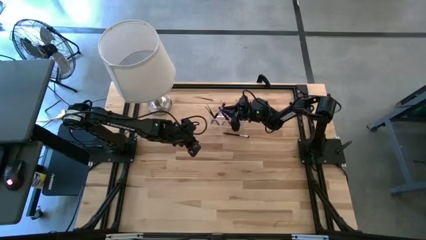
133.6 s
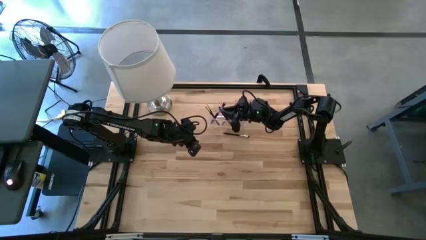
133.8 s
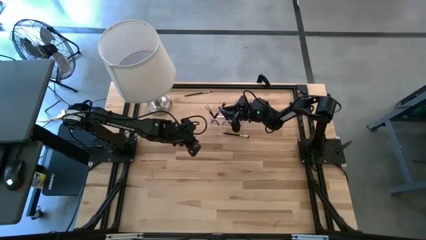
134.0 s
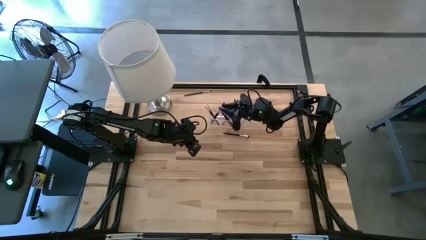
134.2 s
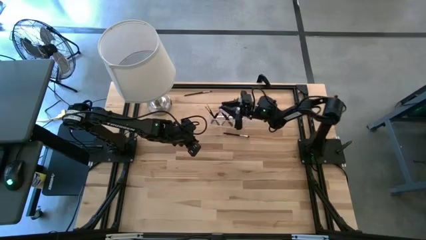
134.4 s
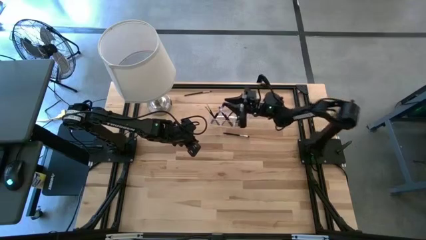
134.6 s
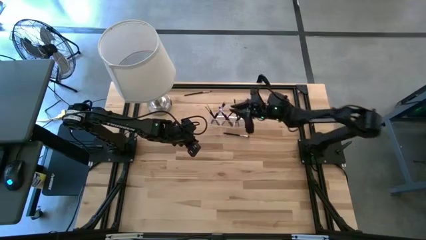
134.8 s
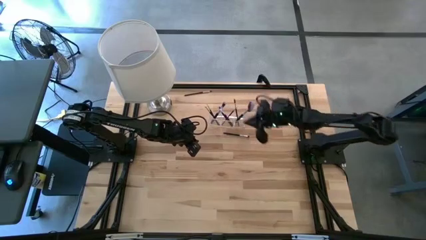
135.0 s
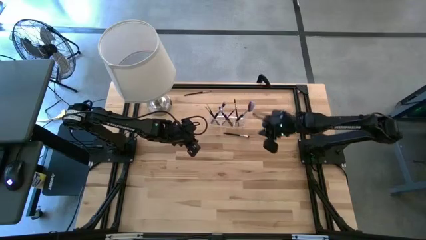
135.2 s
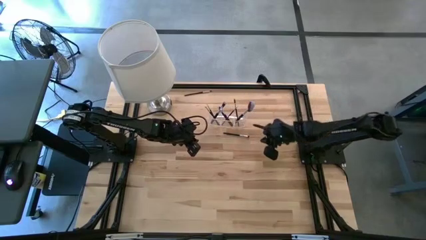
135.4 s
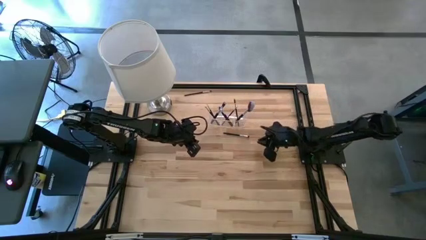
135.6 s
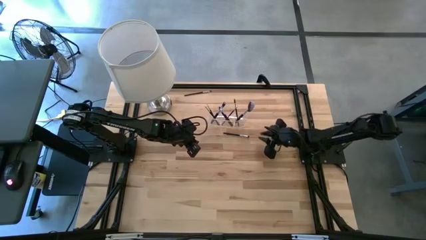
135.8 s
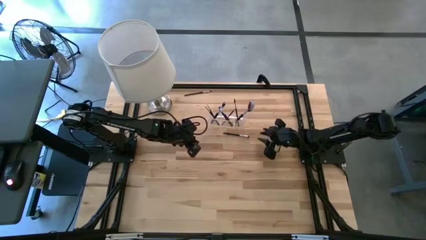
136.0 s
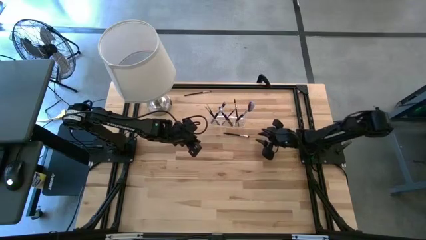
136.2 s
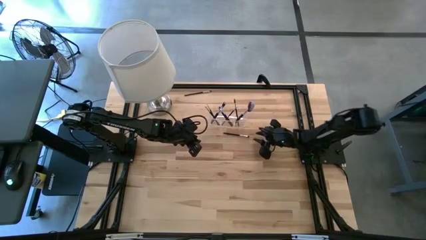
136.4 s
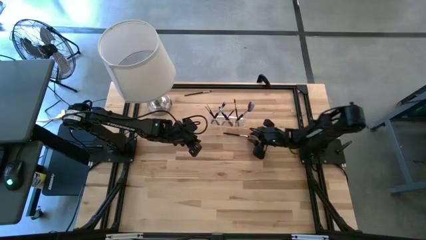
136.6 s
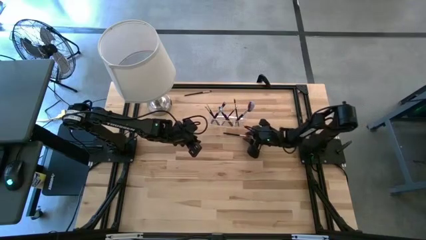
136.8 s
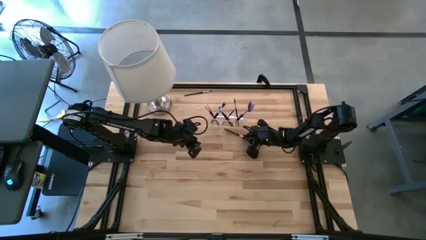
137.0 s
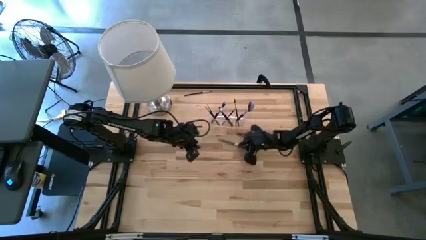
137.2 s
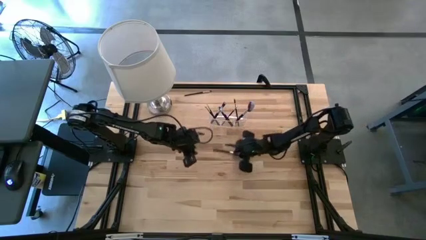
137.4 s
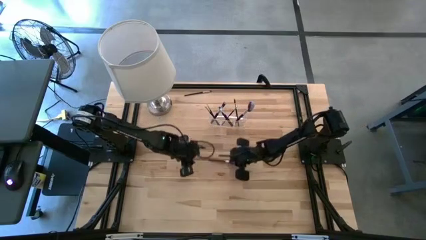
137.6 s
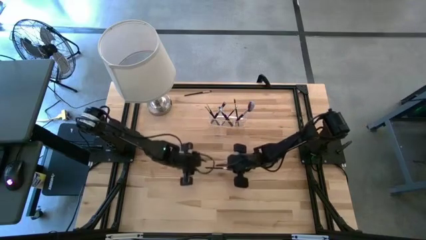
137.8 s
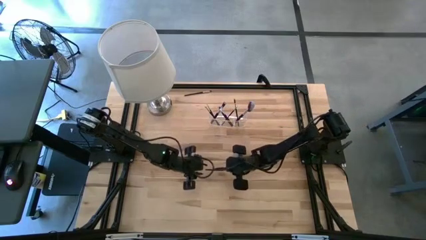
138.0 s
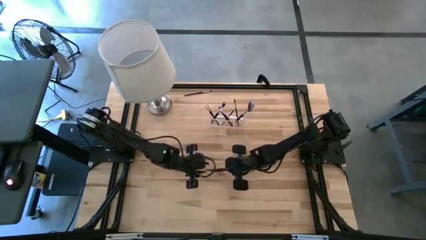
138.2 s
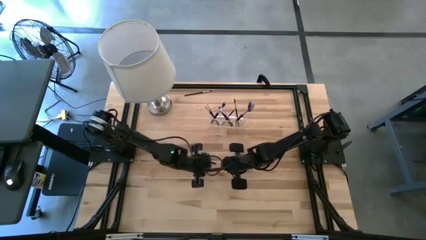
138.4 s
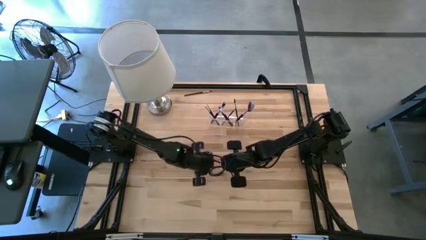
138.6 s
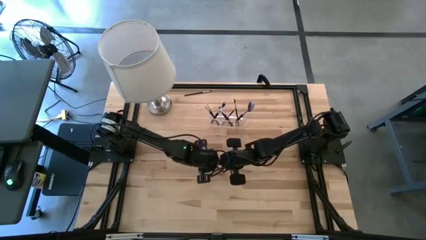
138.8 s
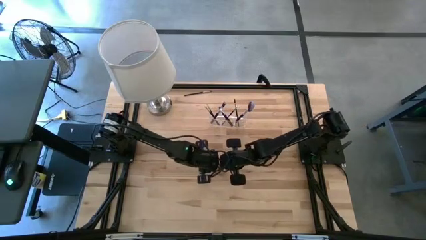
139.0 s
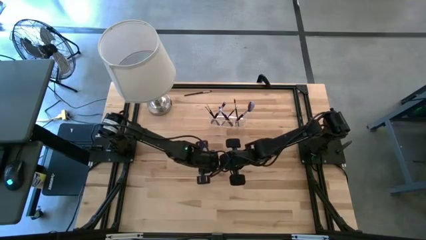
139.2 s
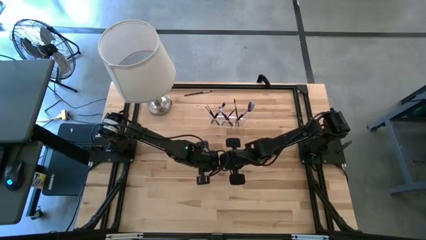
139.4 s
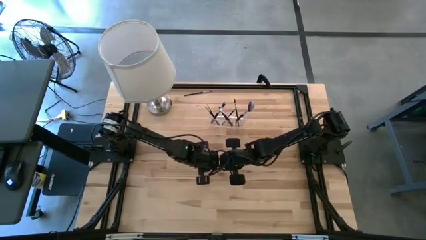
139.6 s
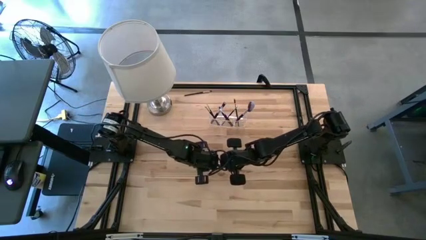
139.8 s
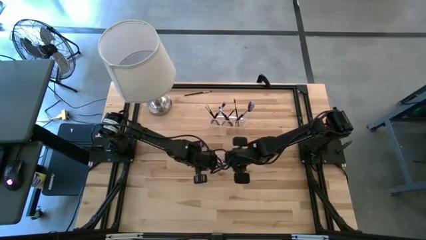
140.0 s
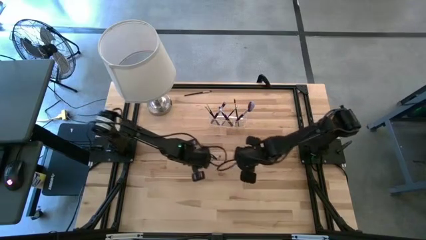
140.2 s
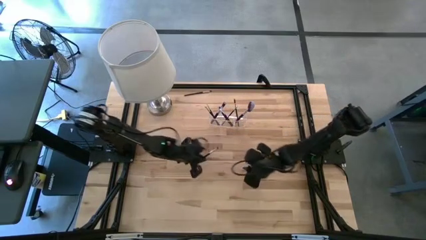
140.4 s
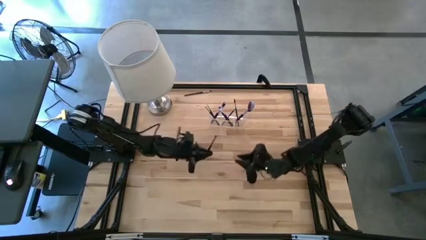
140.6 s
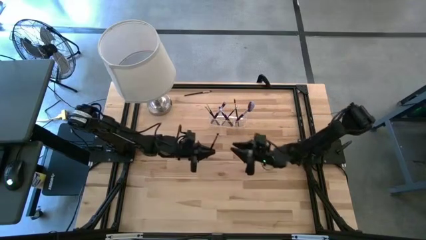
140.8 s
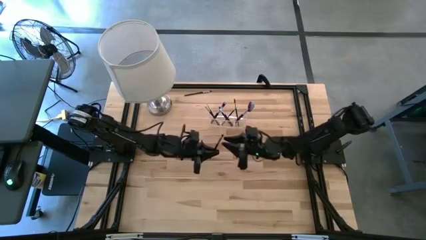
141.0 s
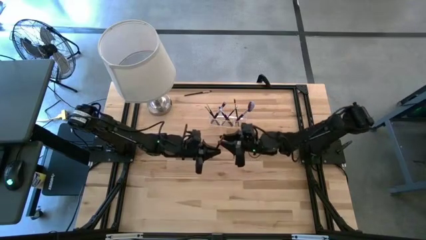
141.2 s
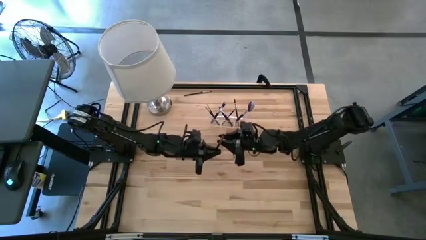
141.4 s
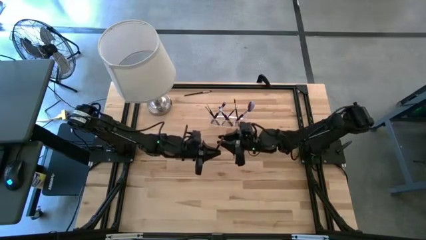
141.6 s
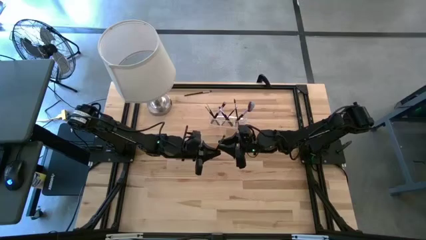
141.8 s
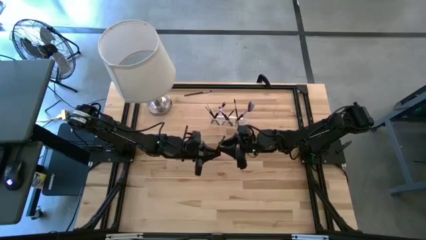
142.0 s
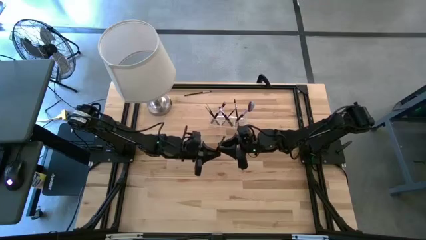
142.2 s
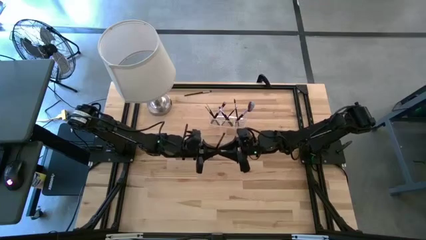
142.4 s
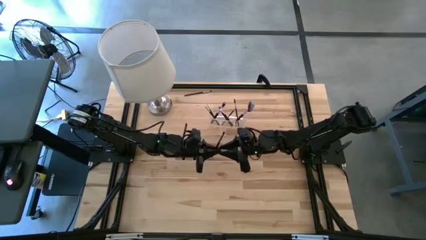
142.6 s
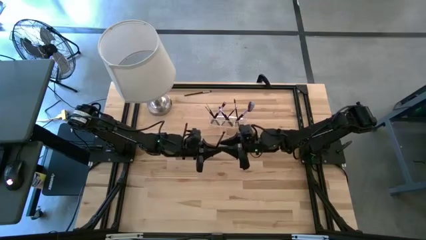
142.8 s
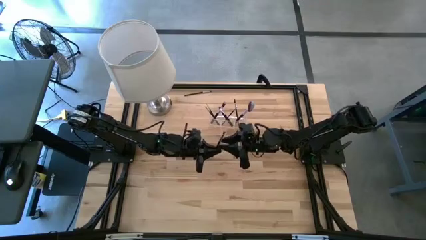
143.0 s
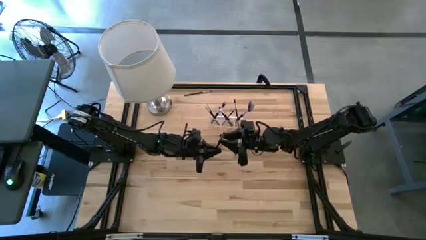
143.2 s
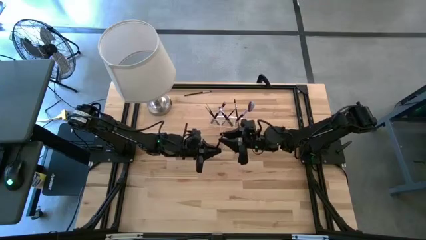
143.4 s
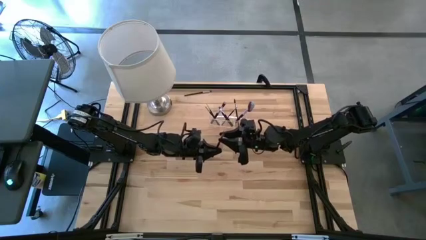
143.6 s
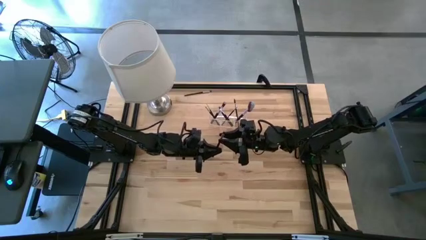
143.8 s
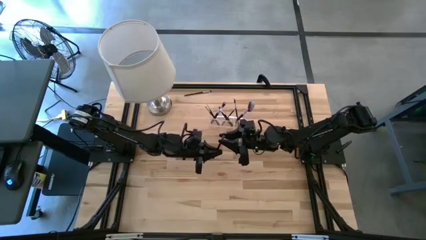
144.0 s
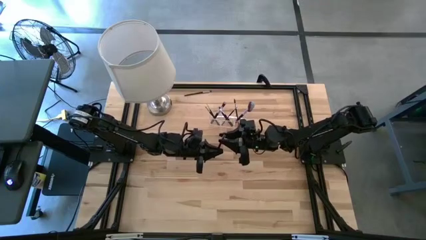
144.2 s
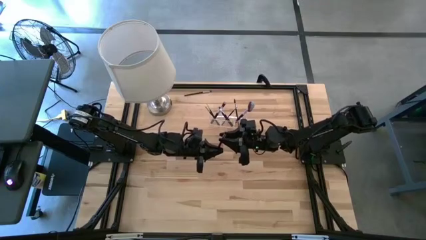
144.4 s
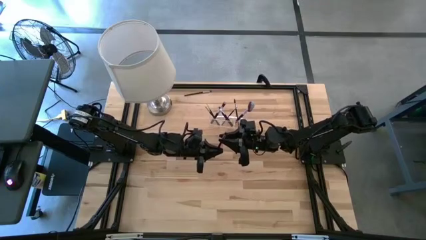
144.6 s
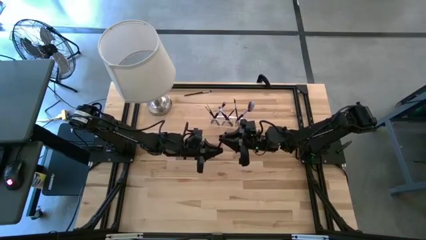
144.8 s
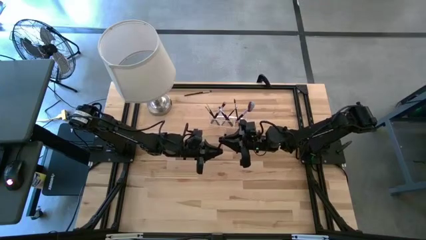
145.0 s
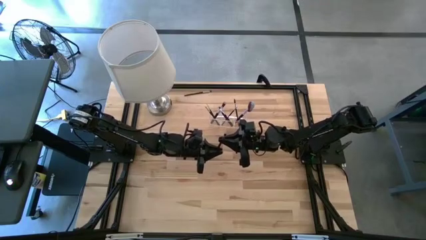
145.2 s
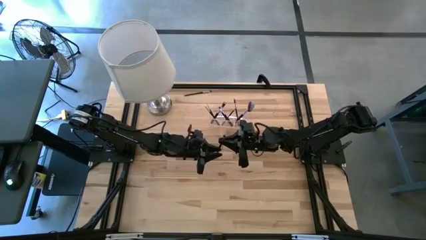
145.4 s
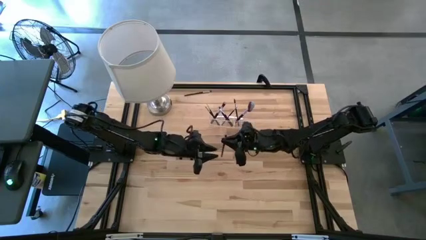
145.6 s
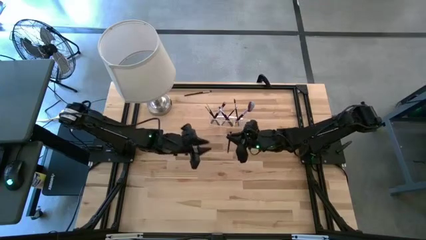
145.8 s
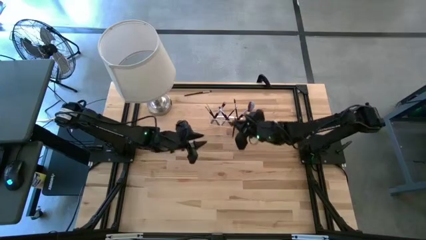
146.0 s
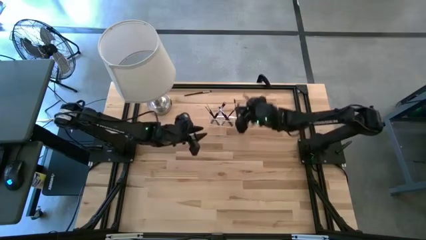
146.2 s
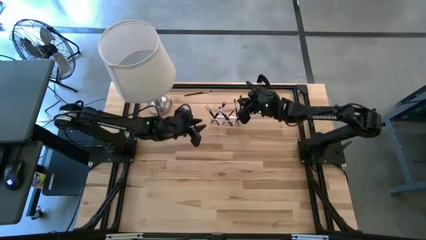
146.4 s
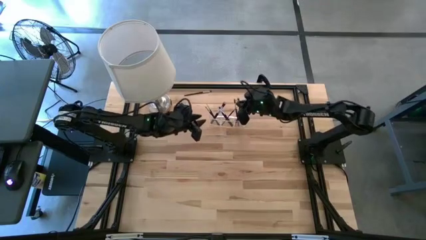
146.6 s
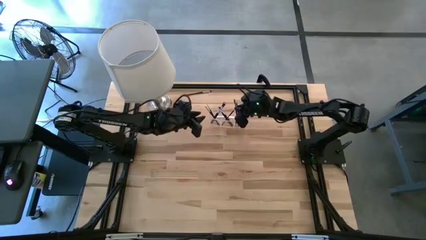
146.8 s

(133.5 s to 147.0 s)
Task: Put items in baskets/containers
Put the blush brush into the transparent organizer

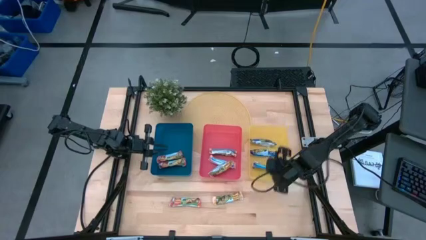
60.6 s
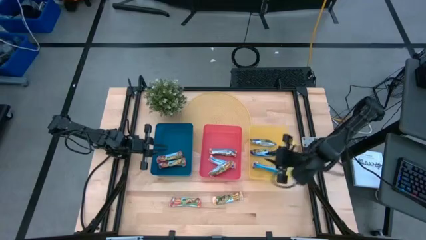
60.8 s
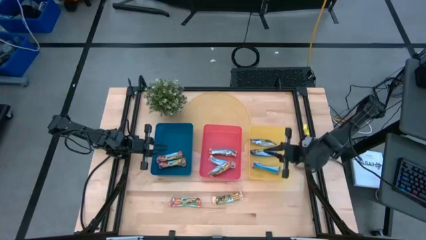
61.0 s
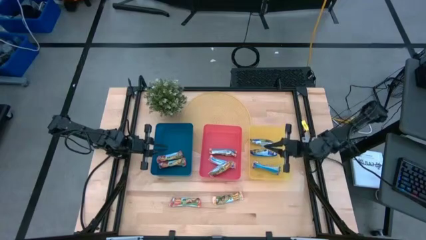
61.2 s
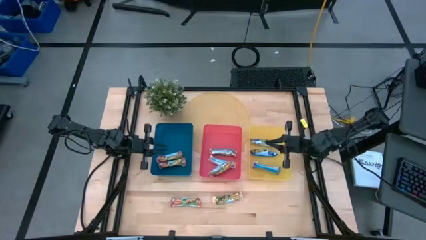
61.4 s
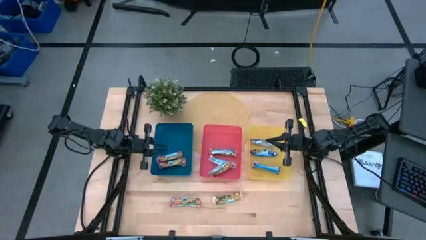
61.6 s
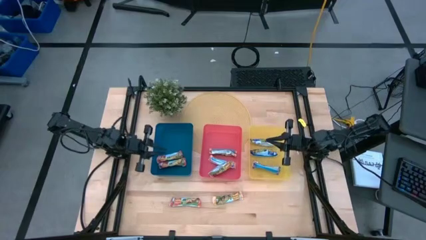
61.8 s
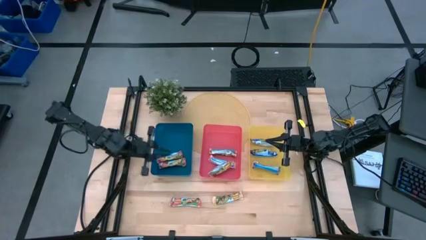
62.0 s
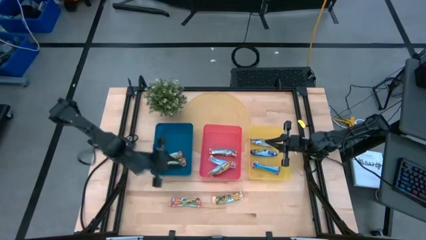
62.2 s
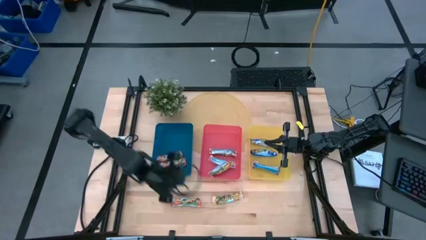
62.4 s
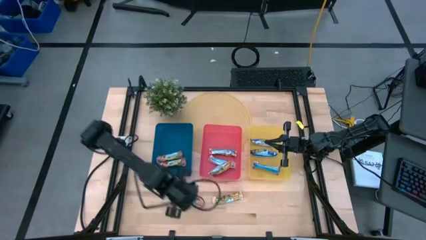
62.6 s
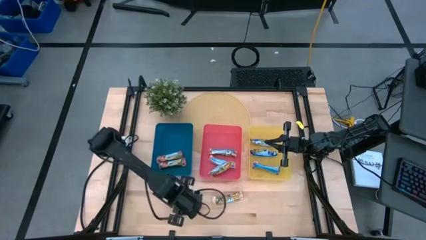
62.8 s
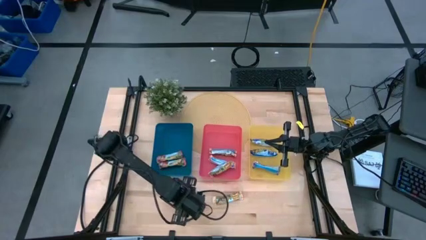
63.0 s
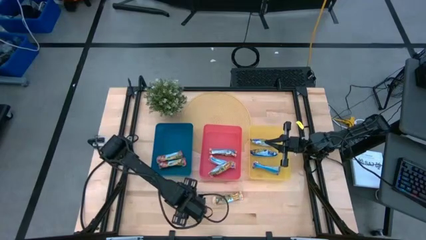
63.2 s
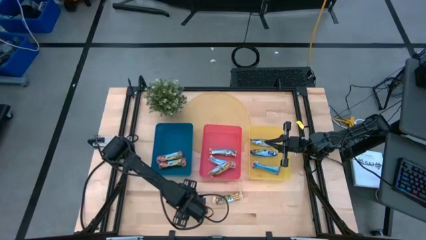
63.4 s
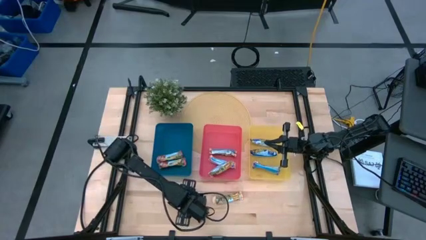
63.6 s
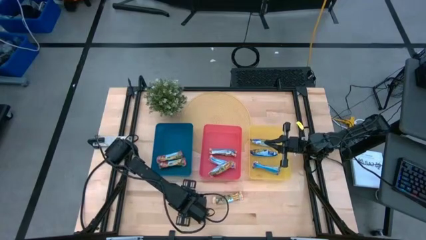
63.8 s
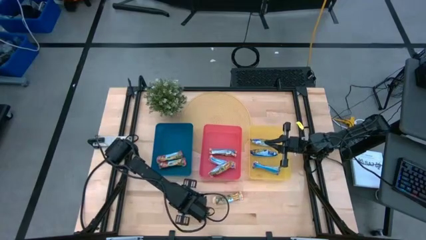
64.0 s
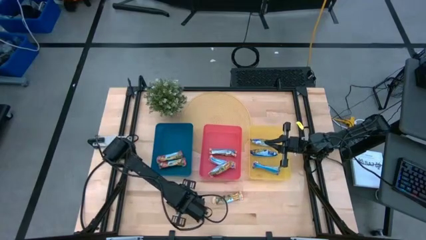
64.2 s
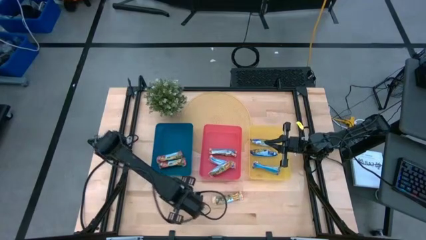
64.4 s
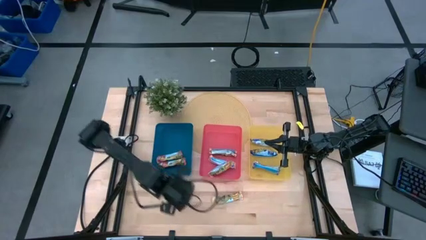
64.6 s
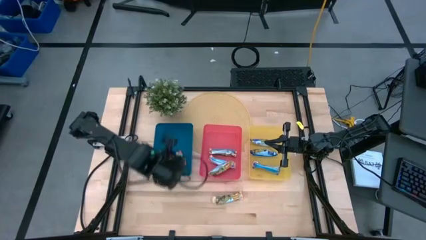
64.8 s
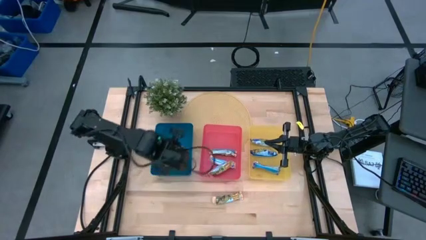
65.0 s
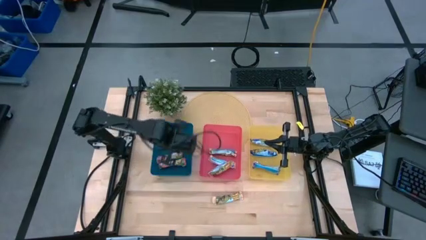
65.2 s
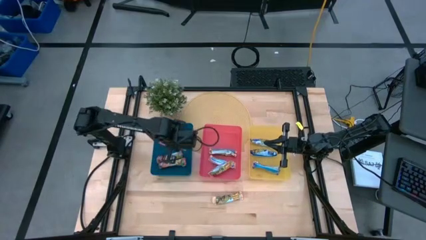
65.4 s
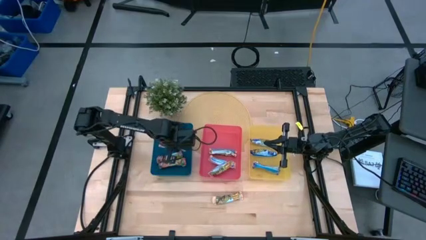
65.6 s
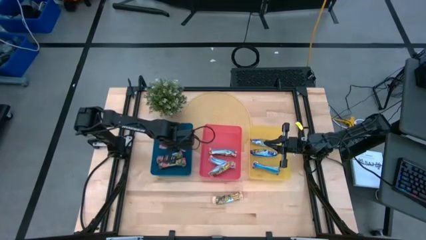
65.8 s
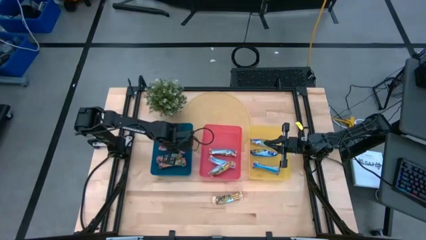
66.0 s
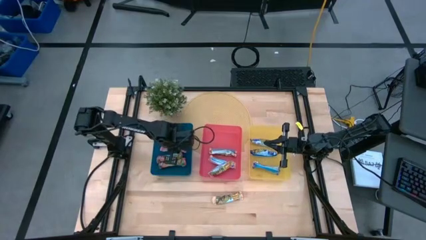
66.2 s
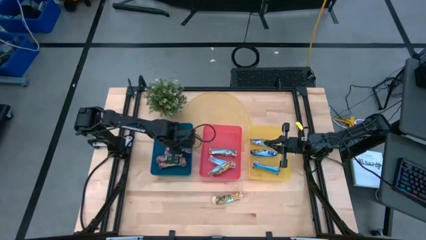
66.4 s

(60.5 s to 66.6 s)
Task: Pick and place Granola Bars by type
Put the red granola bar into the blue bin
